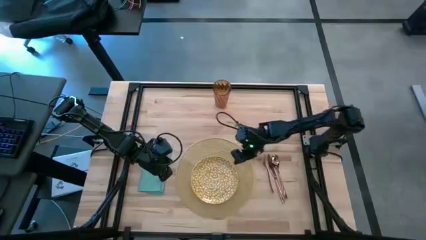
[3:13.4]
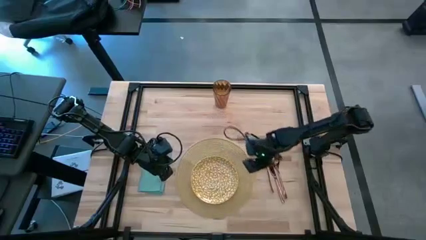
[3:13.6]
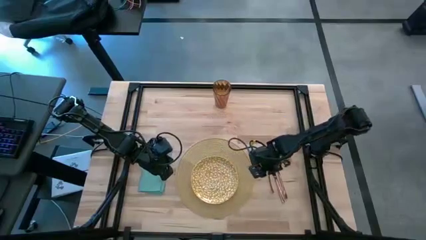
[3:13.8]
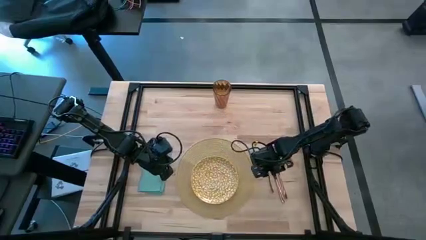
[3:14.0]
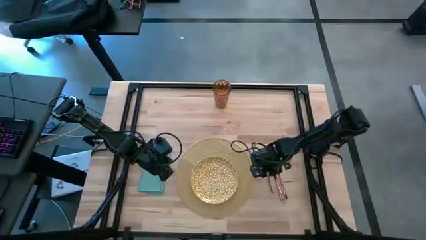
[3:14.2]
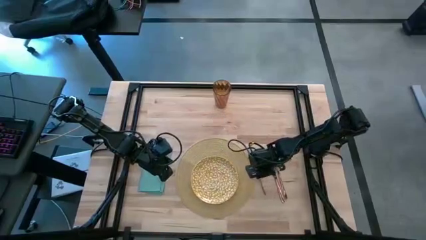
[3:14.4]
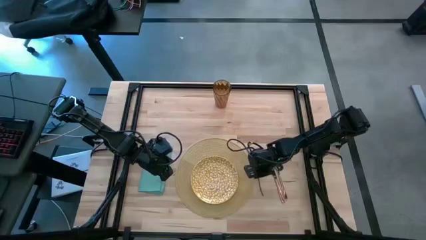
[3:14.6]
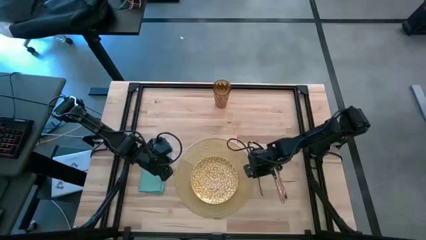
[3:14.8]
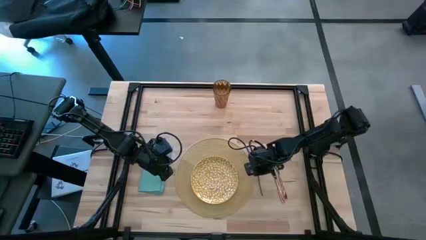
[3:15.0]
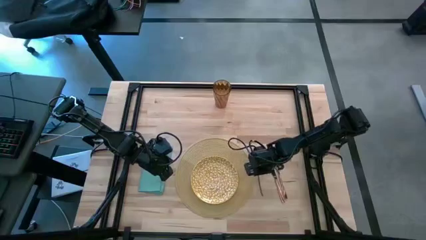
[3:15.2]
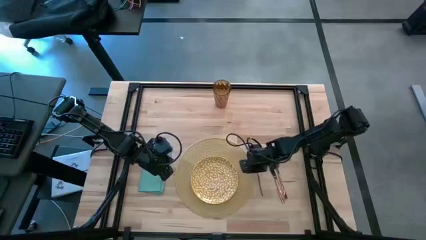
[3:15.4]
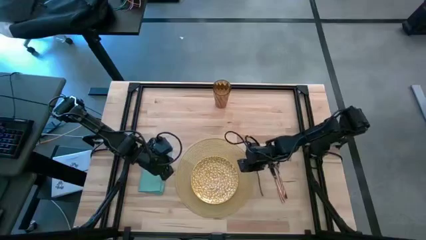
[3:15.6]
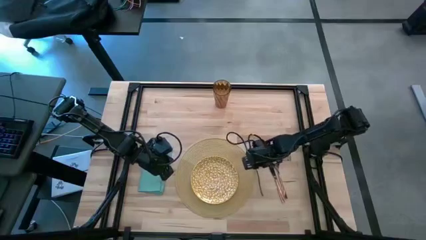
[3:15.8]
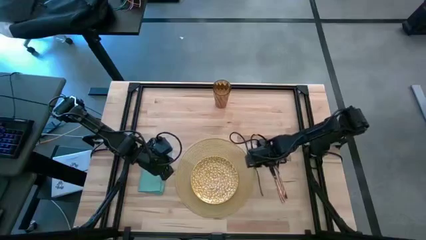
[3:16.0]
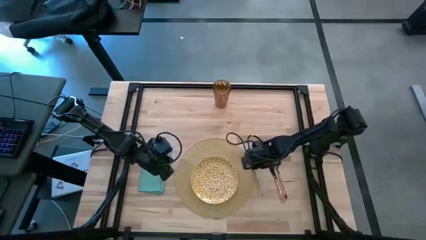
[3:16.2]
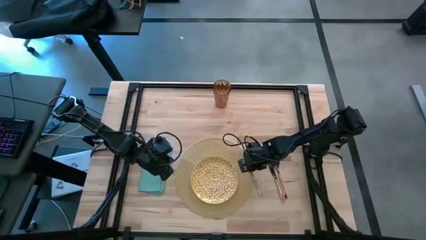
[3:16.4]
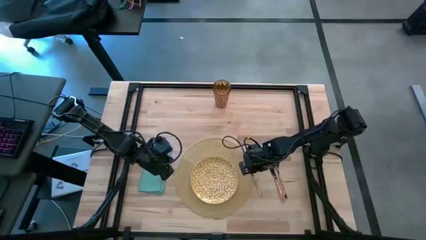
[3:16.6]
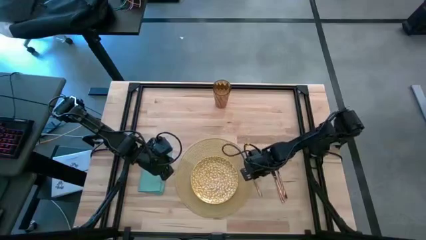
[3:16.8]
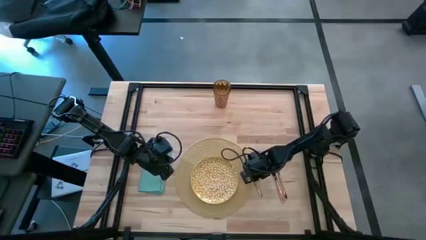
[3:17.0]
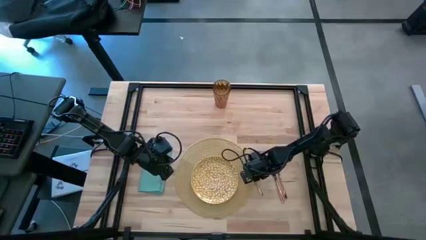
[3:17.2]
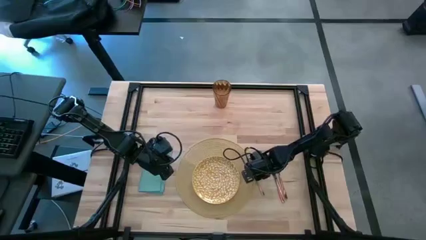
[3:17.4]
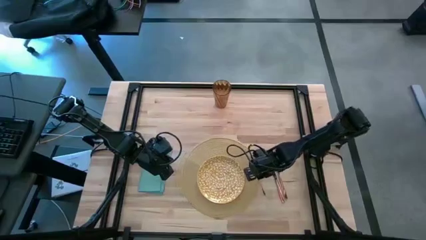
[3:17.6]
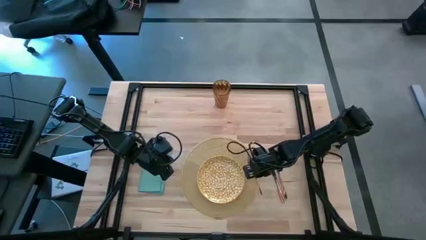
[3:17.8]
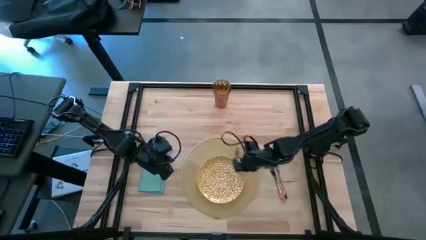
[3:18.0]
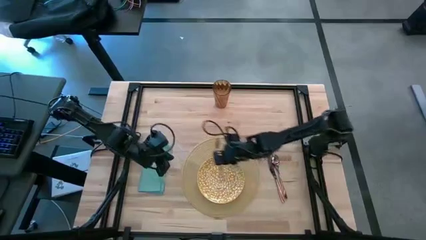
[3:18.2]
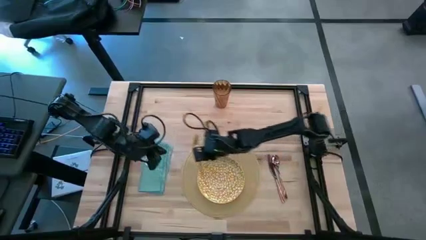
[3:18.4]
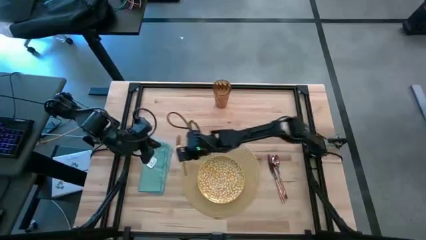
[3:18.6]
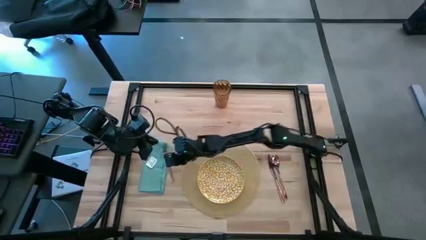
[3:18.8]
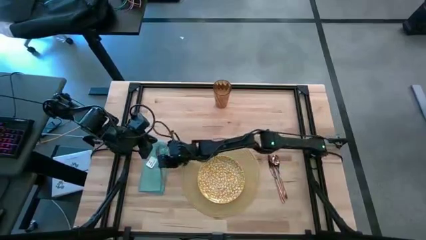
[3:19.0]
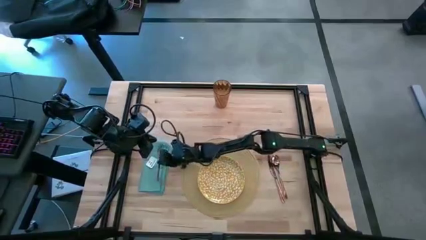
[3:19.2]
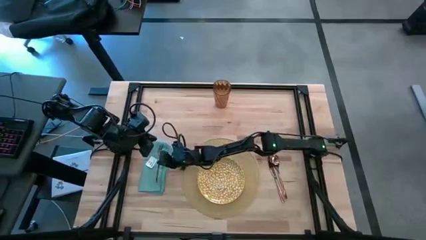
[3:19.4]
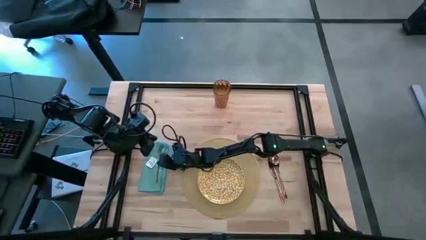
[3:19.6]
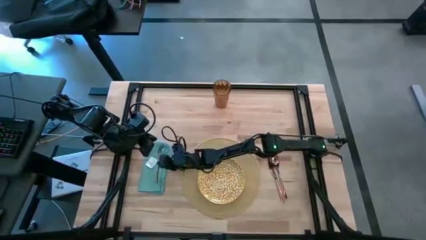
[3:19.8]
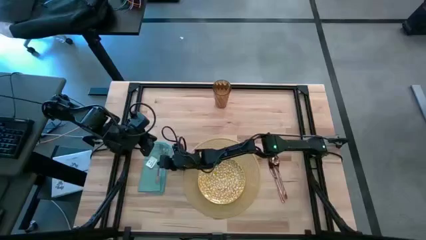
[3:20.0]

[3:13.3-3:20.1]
Task: Set table place
Put the bronze fork on the blue table napkin to the left of the brown placemat

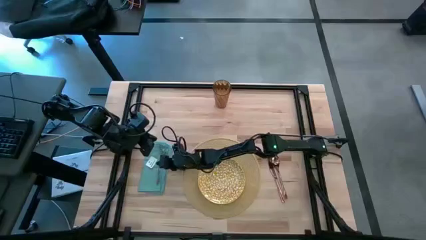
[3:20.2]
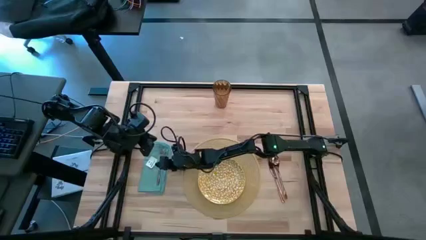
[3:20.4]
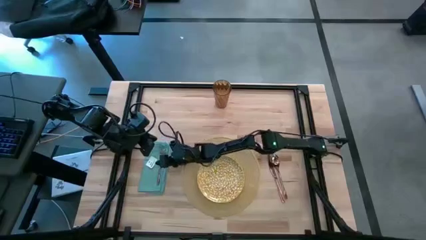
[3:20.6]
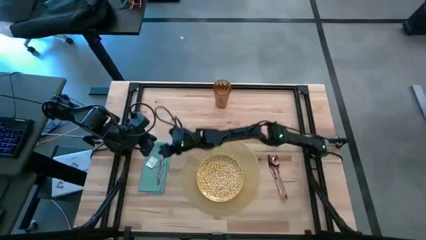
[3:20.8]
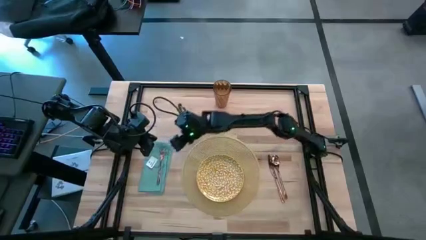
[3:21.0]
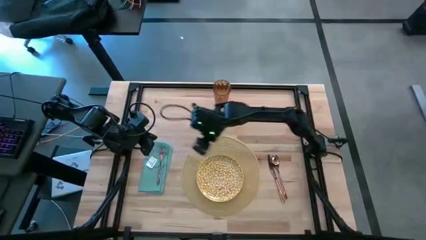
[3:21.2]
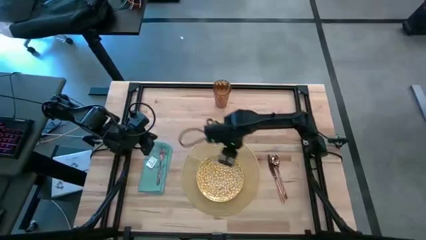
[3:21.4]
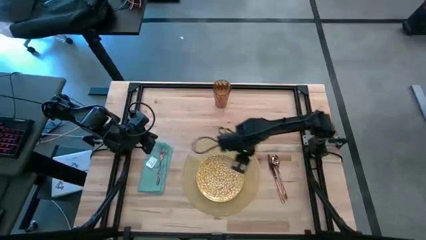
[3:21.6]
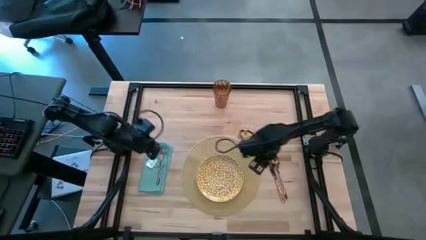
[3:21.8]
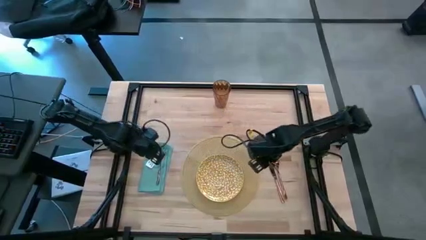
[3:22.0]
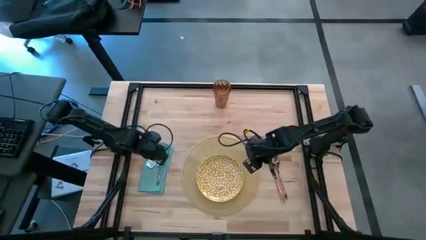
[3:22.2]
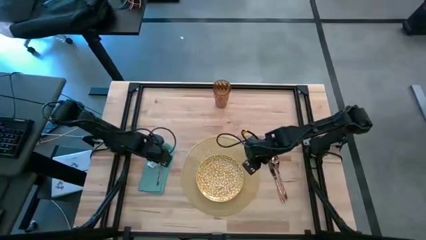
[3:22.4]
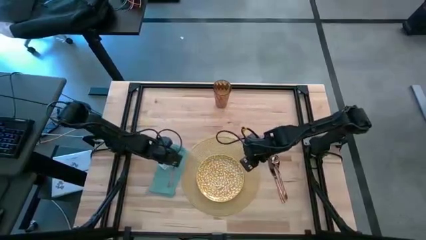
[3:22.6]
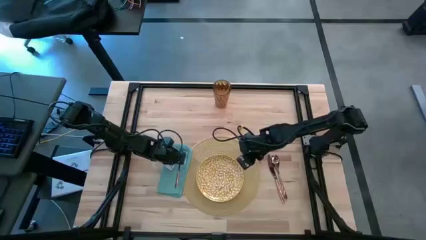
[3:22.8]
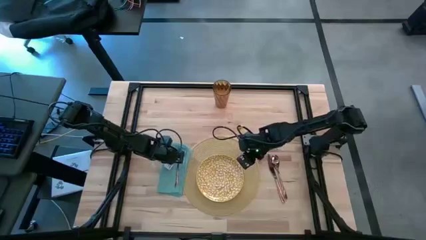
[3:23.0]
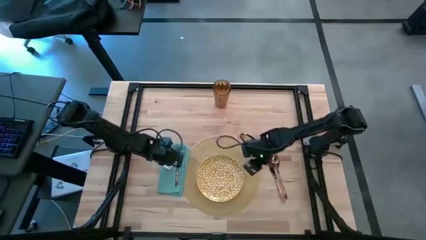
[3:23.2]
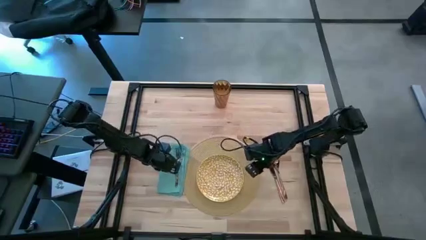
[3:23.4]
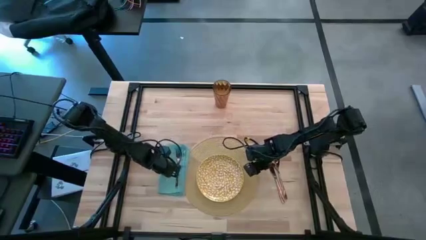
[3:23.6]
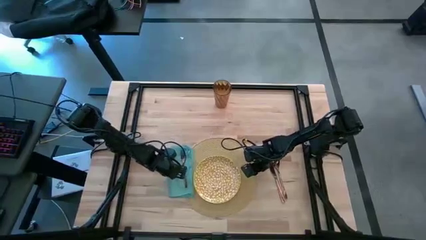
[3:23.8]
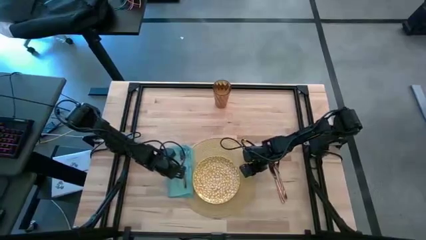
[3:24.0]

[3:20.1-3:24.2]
Adjust the blue table napkin and the brown placemat on the table

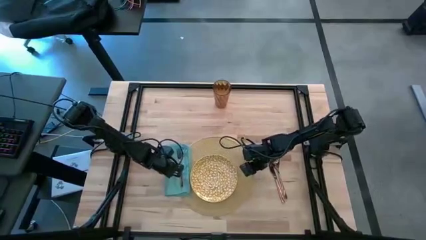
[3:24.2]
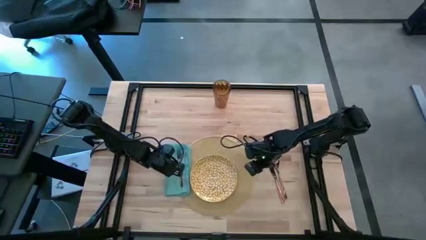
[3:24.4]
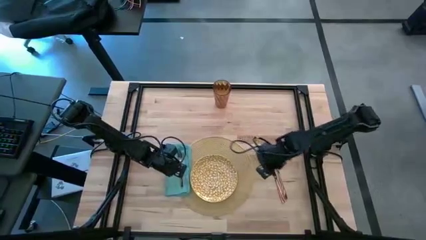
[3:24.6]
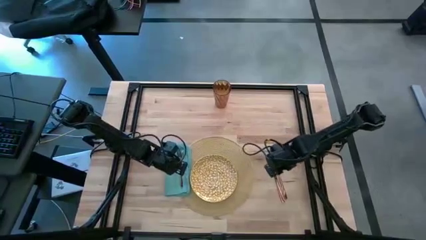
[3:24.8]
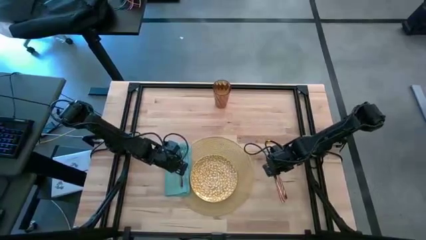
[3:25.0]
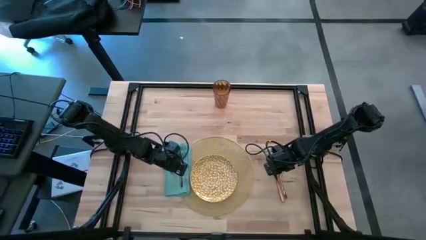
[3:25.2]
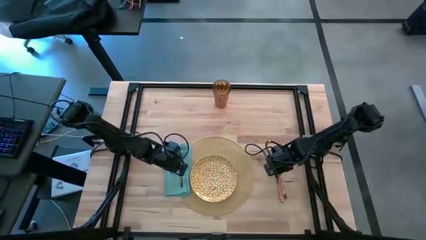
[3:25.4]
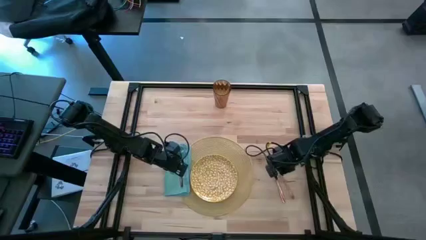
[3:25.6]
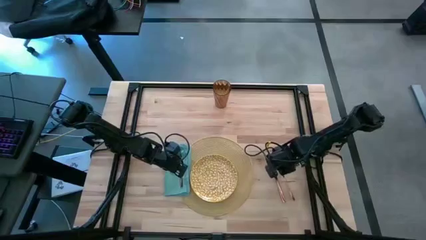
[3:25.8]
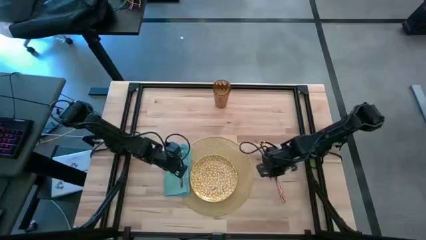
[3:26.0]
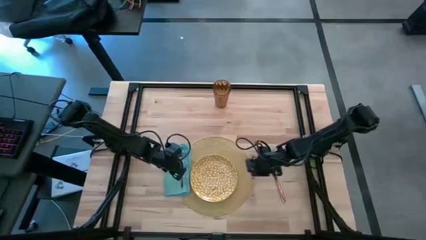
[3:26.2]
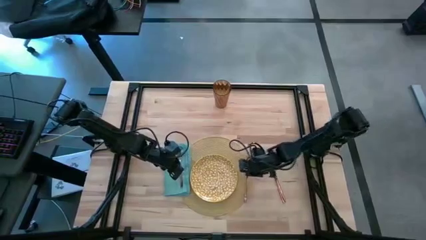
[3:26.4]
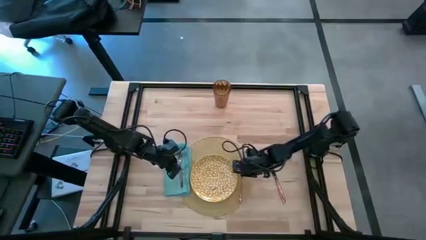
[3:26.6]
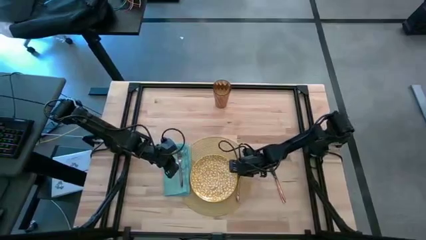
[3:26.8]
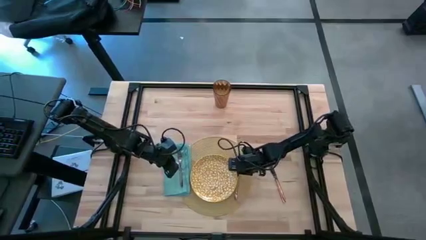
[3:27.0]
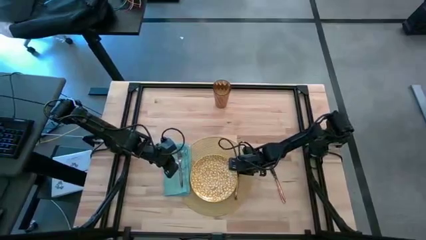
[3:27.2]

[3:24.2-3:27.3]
Put the bronze spoon on the brown placemat to the right of the yellow plate

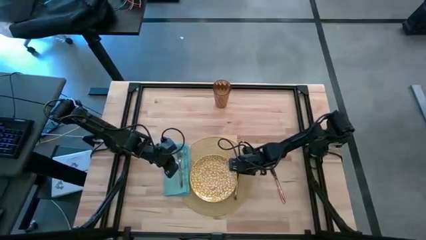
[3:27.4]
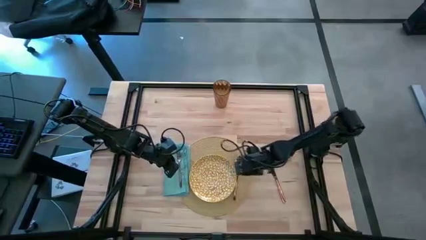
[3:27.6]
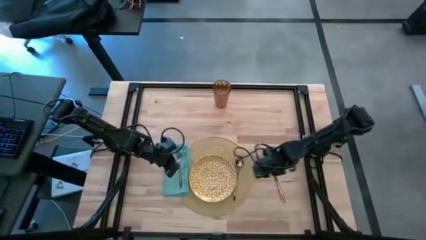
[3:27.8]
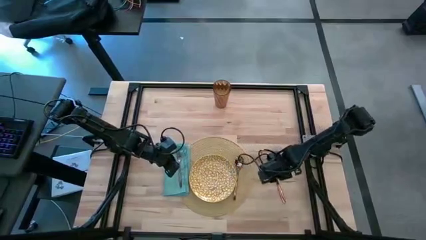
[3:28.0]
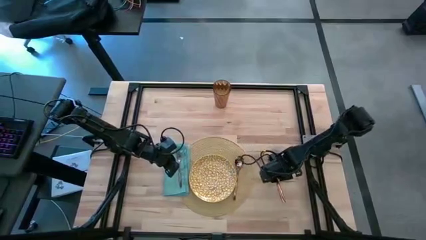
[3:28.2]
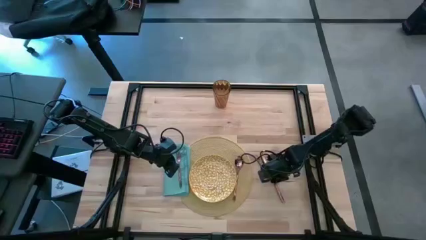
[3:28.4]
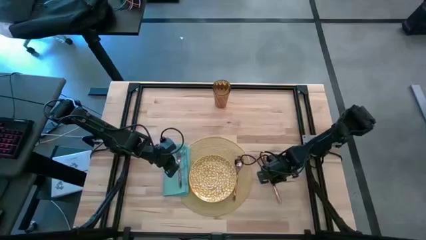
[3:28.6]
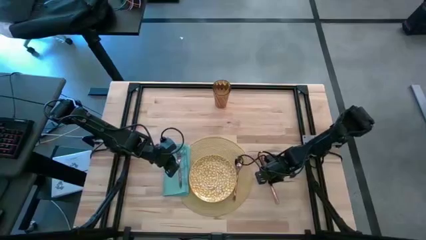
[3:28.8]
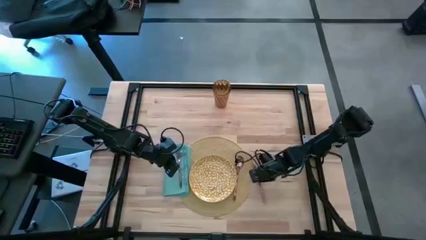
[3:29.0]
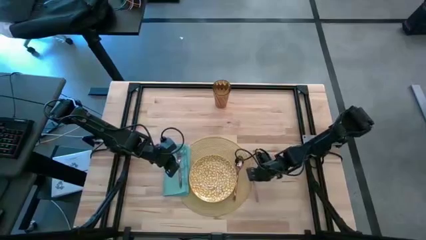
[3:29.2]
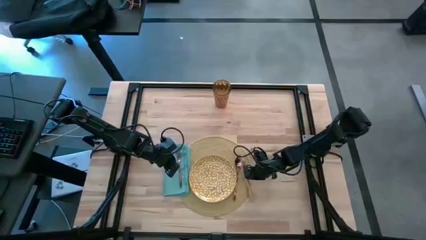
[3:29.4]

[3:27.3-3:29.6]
Put the bronze knife on the brown placemat to the right of the bronze spoon
